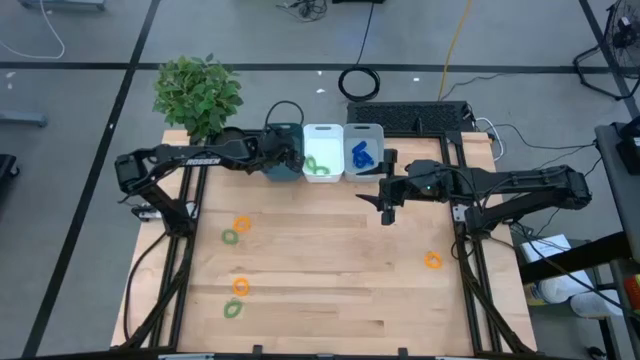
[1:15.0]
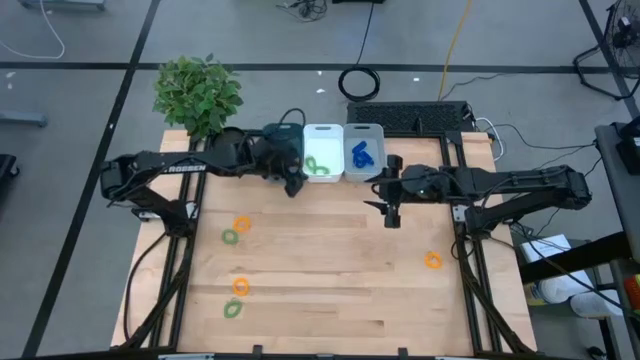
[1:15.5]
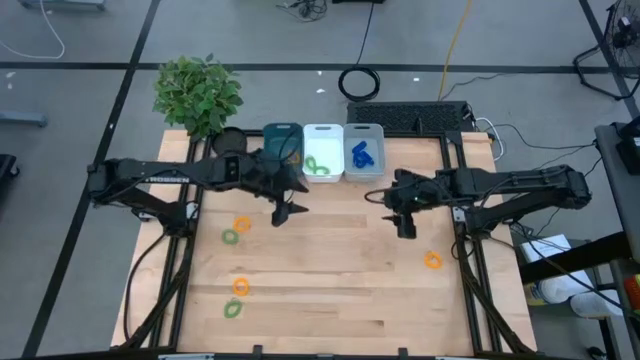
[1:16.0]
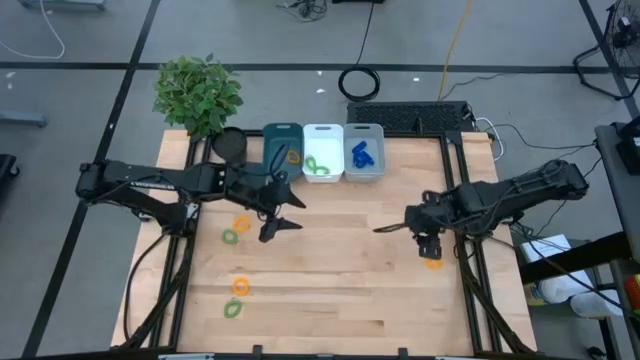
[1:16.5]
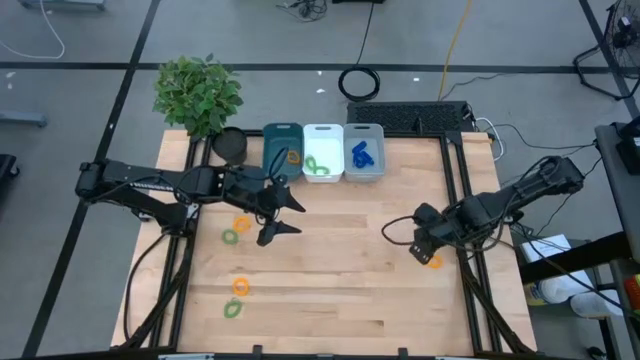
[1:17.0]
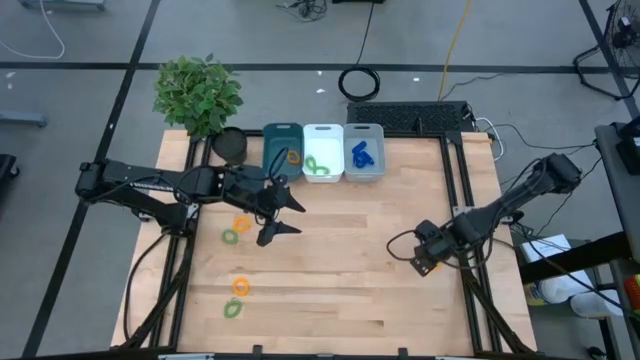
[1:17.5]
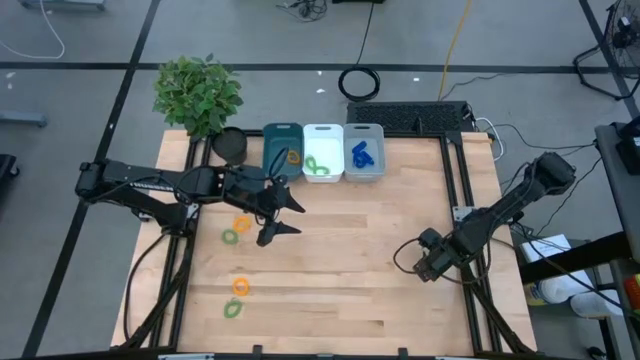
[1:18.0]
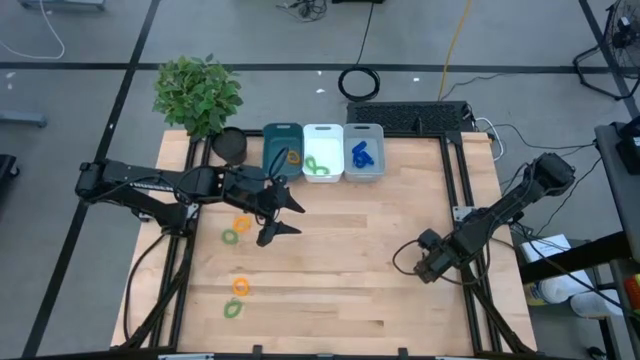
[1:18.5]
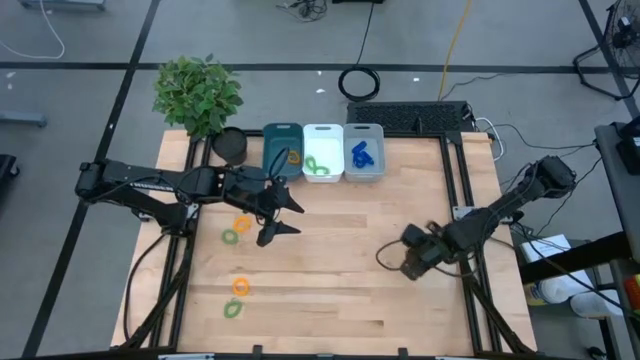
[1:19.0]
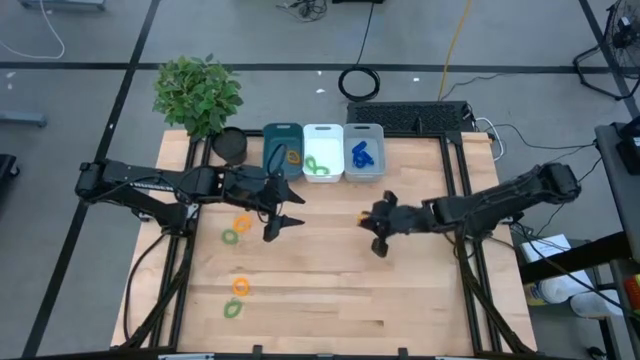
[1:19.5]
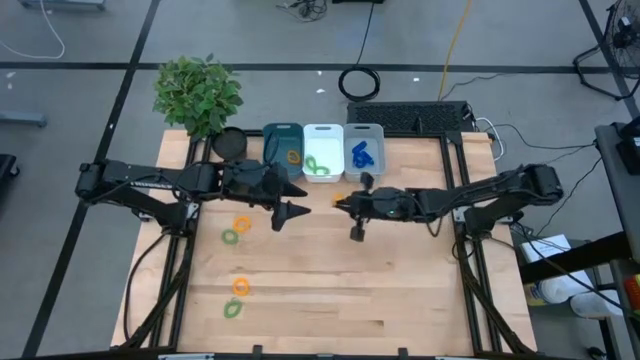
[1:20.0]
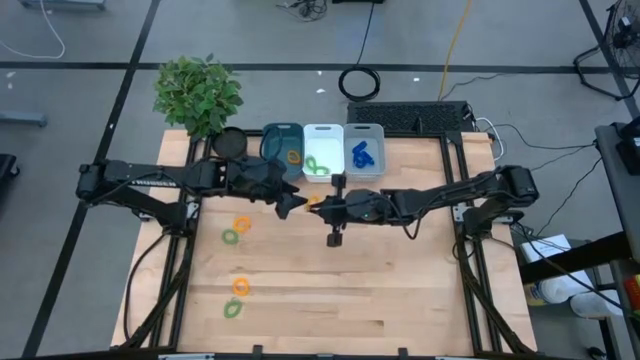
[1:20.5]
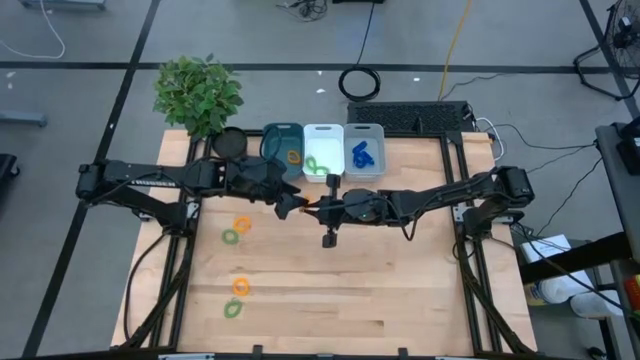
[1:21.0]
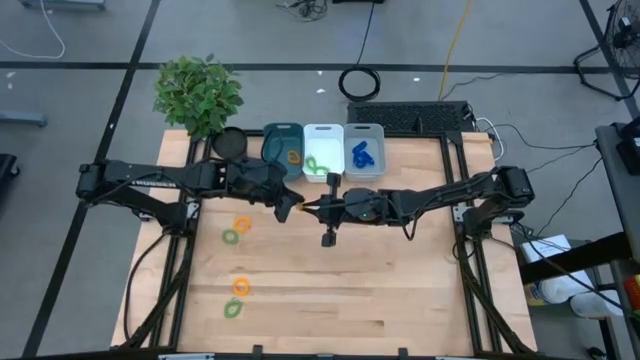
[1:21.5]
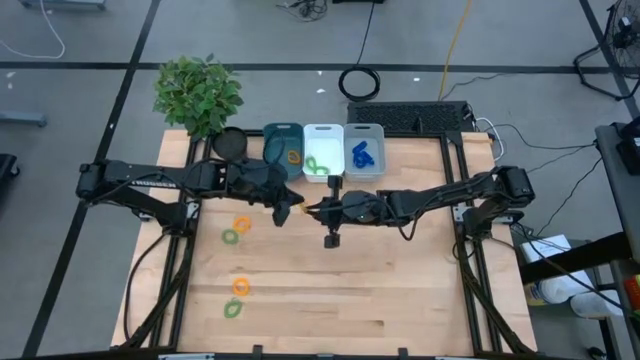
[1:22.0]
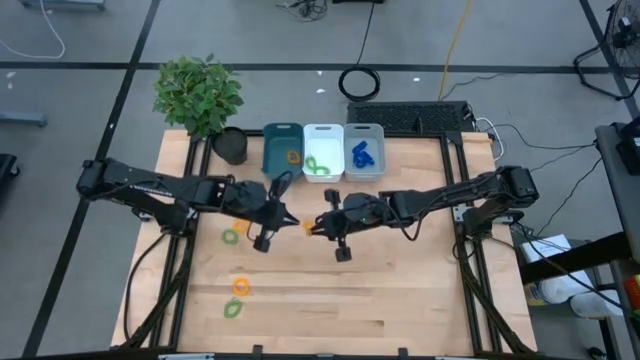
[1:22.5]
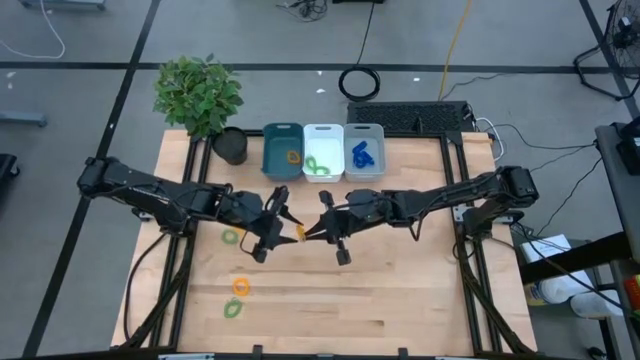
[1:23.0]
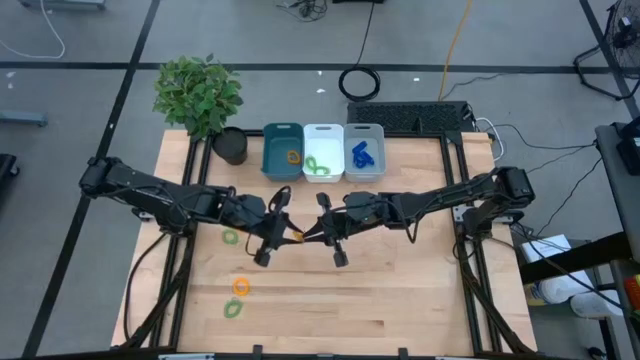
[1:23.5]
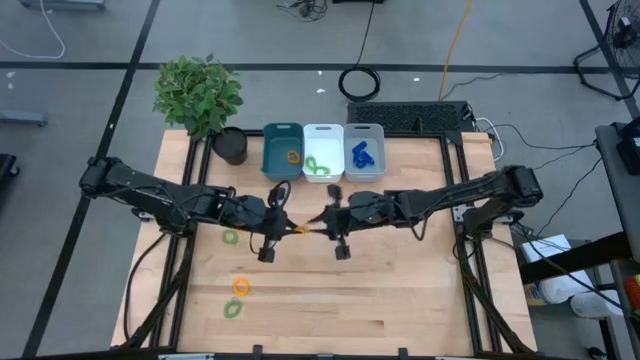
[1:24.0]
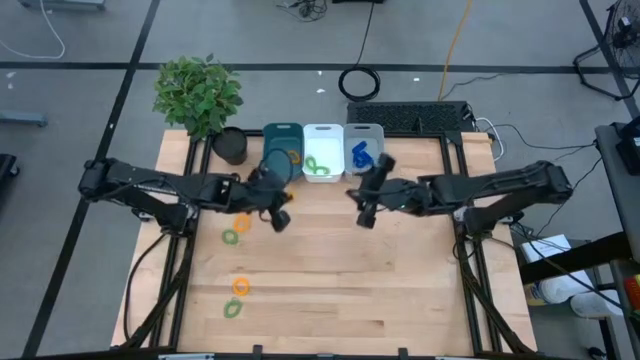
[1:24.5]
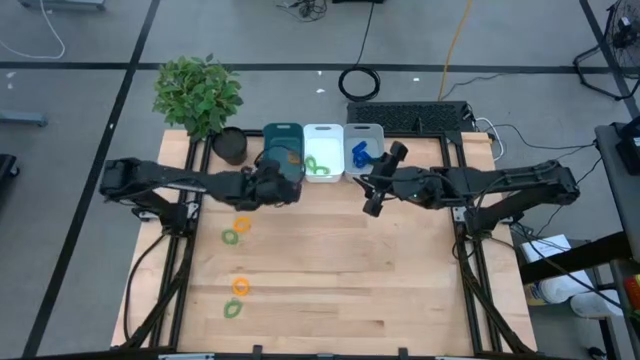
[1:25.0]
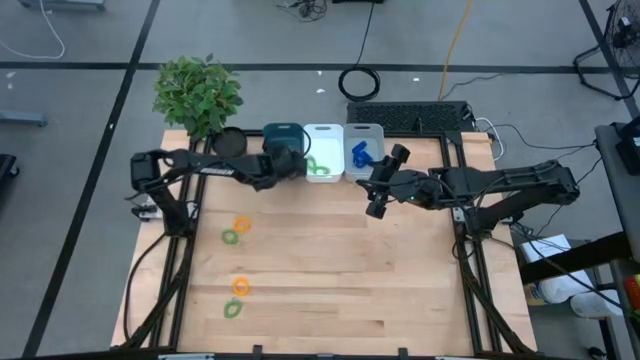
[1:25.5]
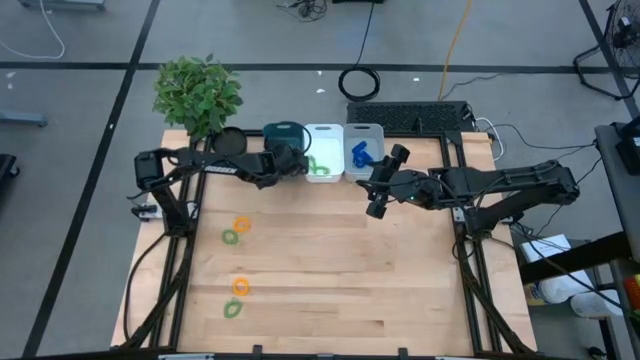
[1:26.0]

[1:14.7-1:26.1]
Task: Sort spring keychains
Put the yellow spring keychain in the blue bin

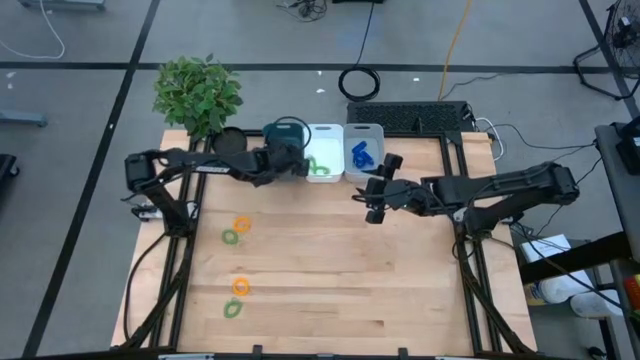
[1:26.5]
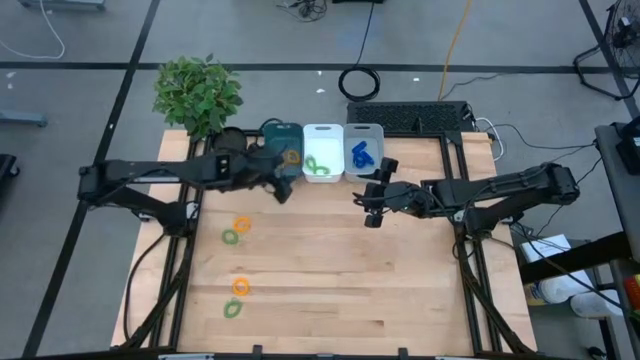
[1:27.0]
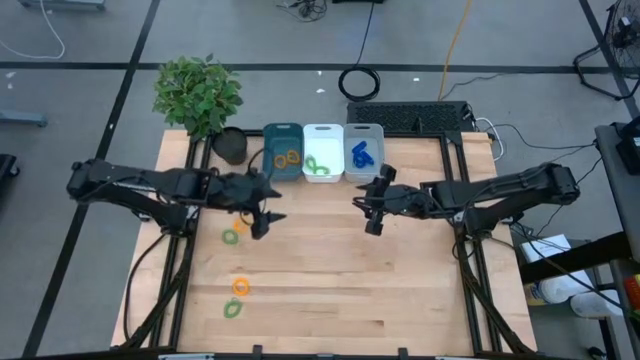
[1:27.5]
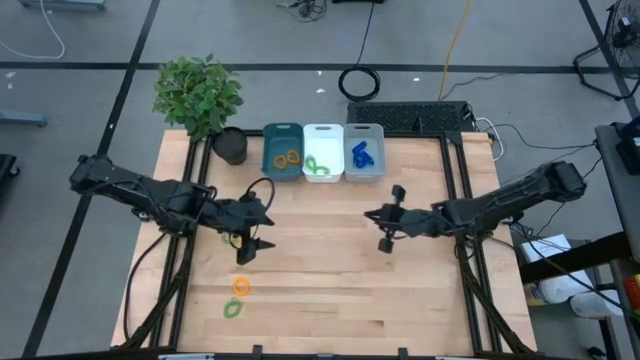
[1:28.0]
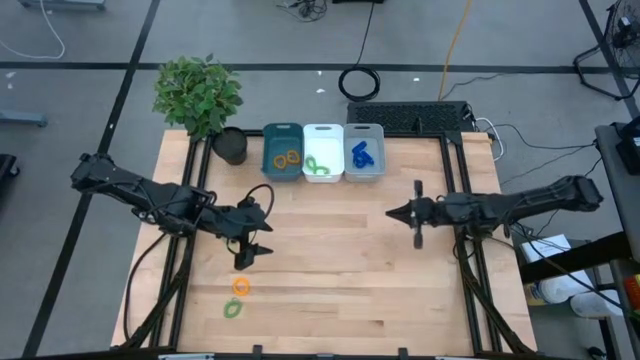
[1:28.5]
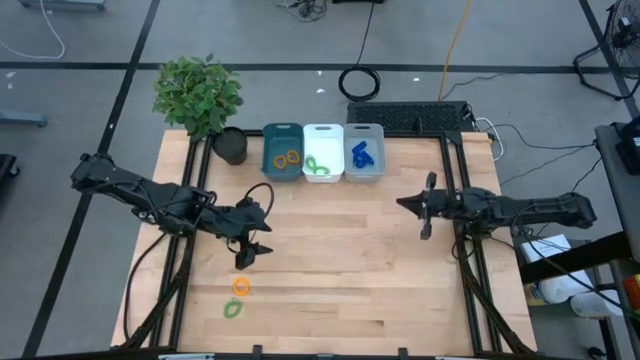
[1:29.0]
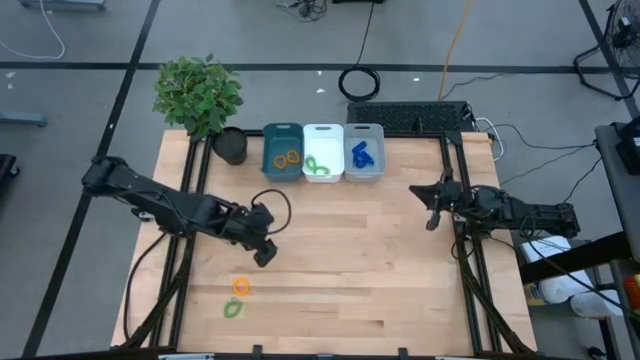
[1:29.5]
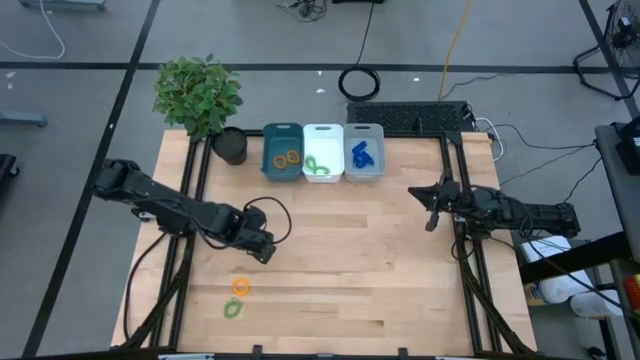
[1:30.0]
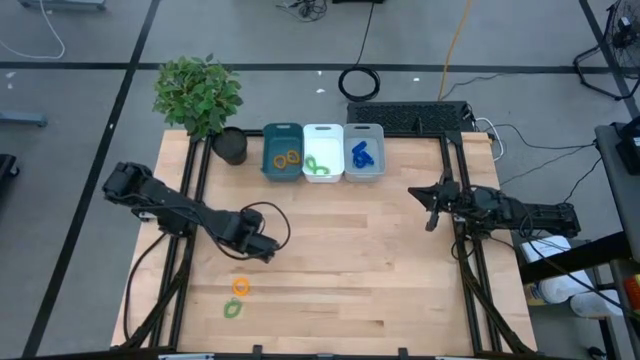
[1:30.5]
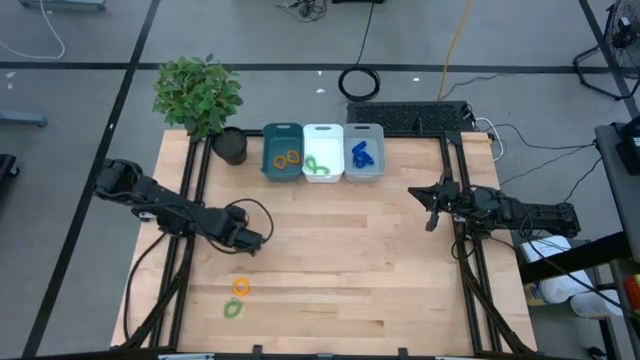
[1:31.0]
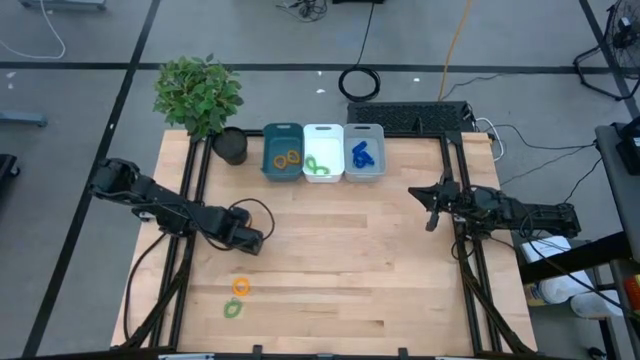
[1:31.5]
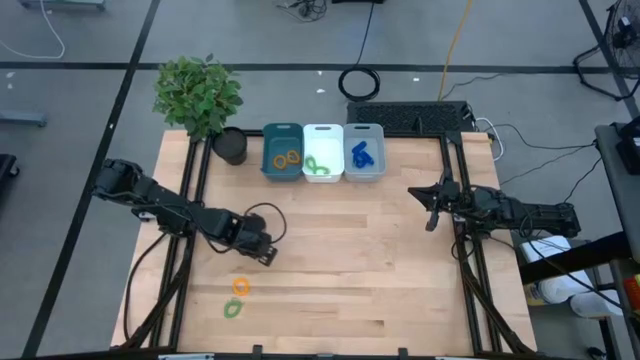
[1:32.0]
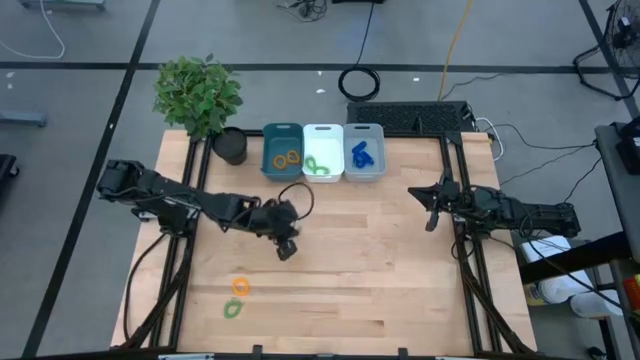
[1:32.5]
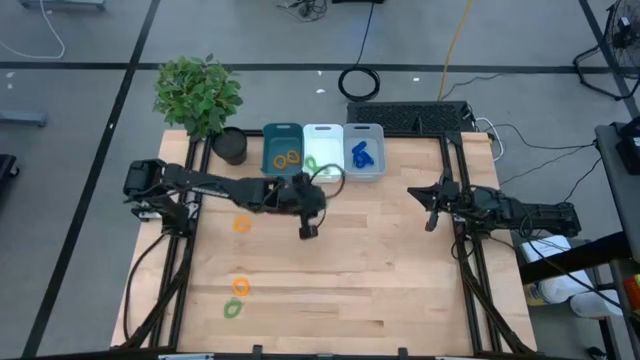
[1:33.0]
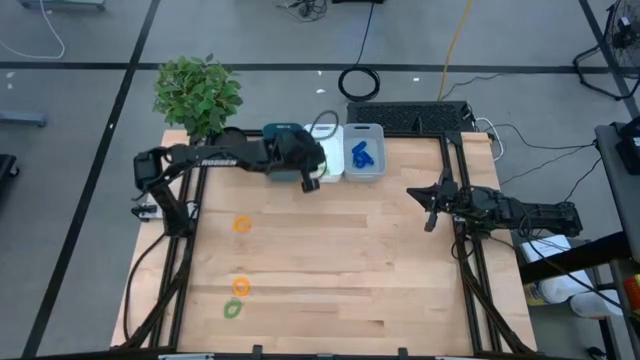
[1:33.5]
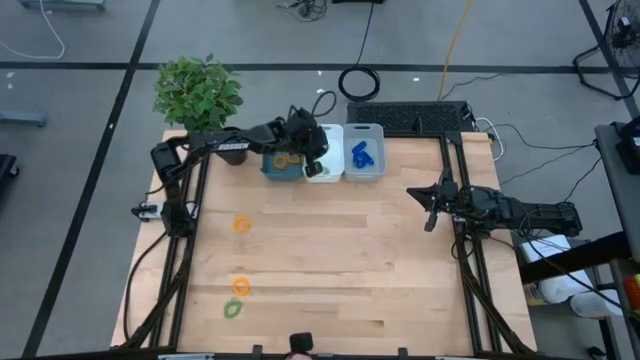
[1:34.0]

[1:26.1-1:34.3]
Put the green spring keychain in the white bin

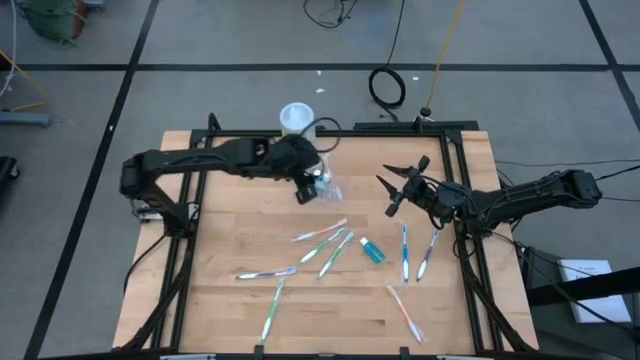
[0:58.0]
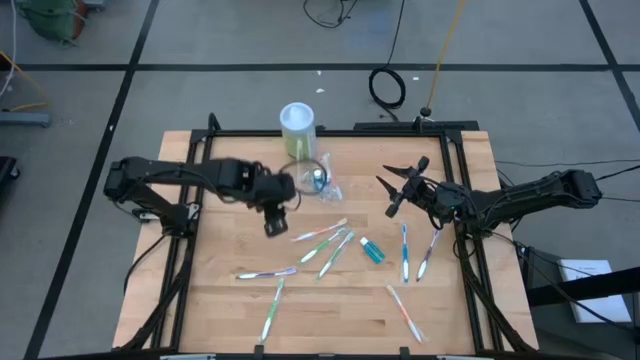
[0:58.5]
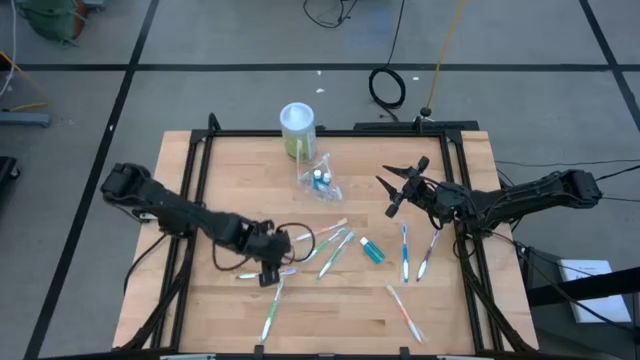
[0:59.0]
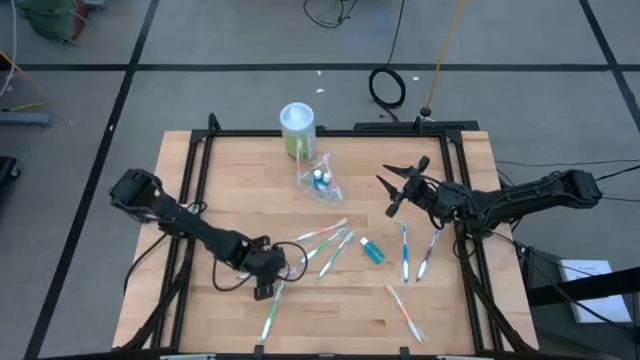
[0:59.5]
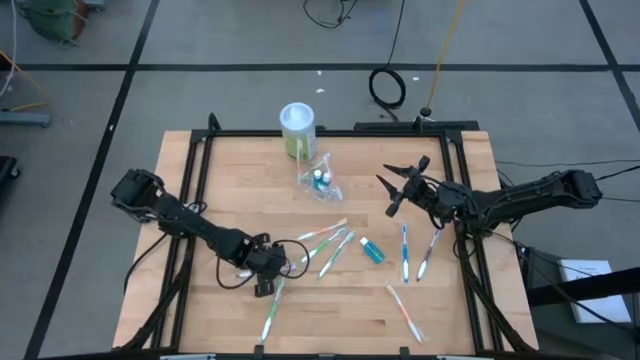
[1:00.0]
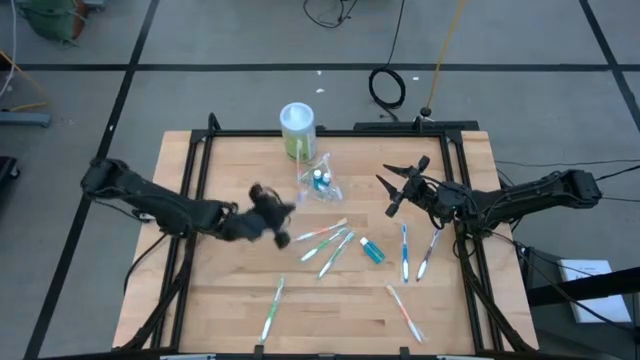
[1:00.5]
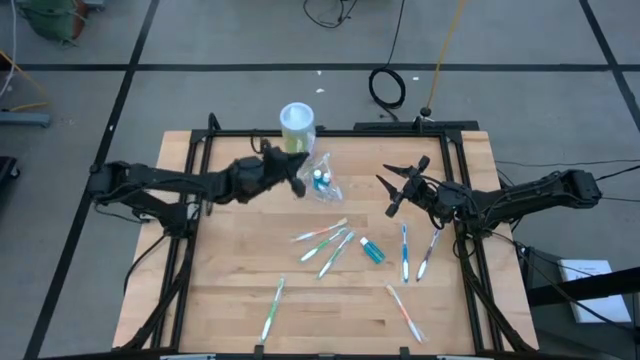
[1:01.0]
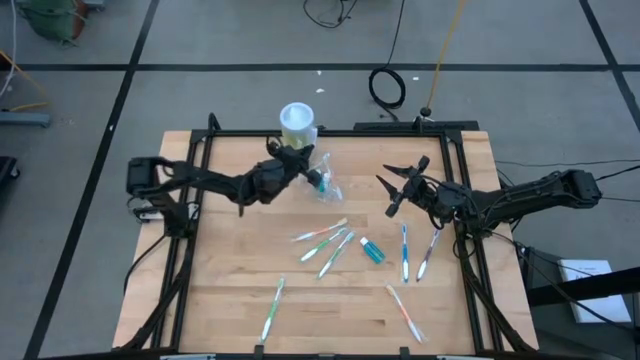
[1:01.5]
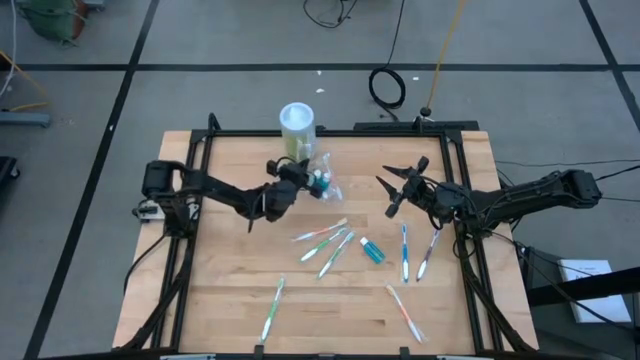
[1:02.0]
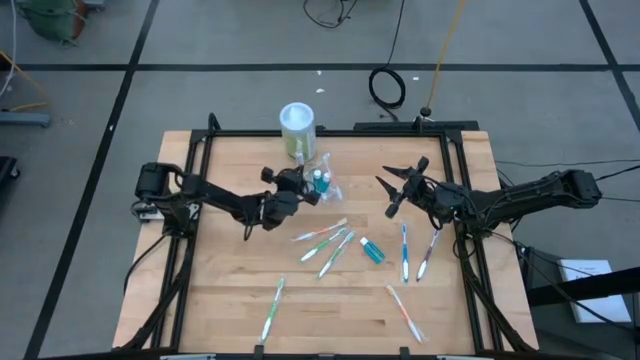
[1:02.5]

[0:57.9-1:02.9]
Task: Pick & Place toothbrushing station
Put the purple toothbrush into the left of the transparent organizer
